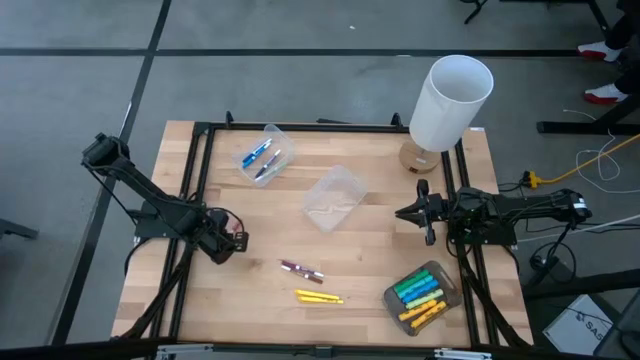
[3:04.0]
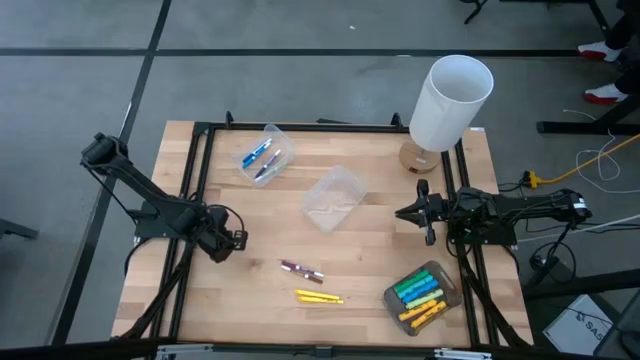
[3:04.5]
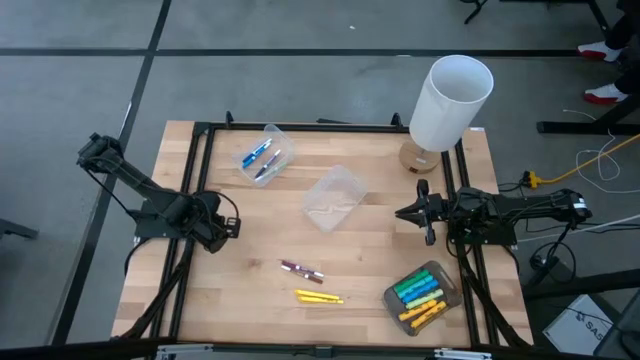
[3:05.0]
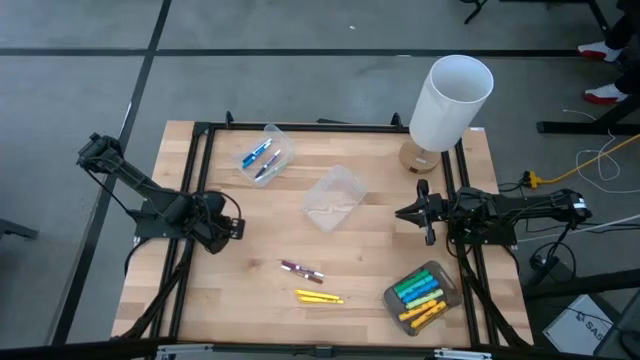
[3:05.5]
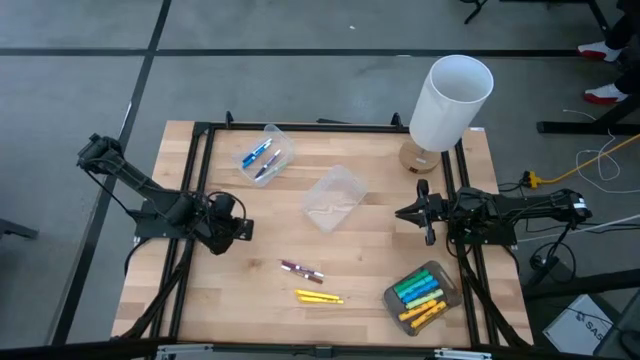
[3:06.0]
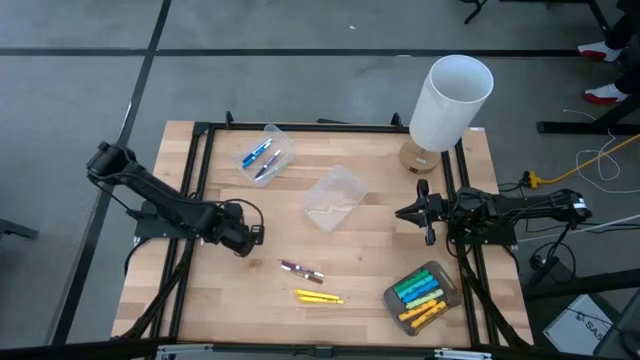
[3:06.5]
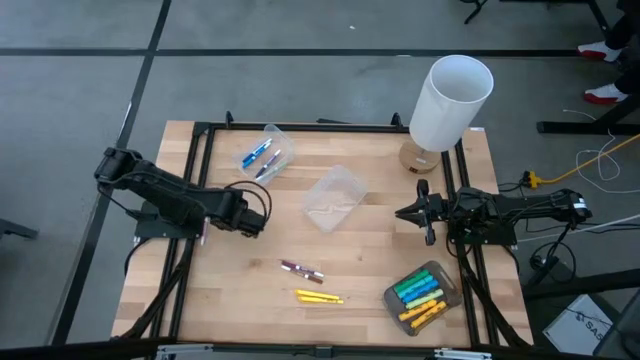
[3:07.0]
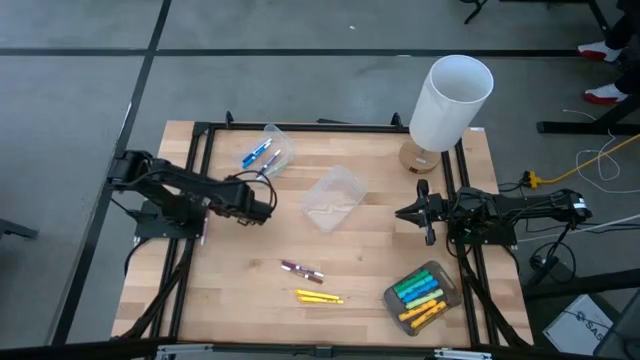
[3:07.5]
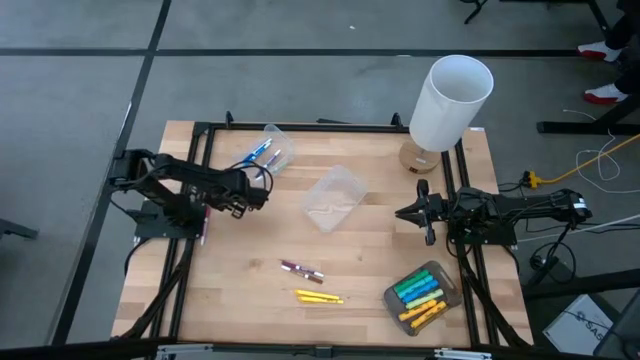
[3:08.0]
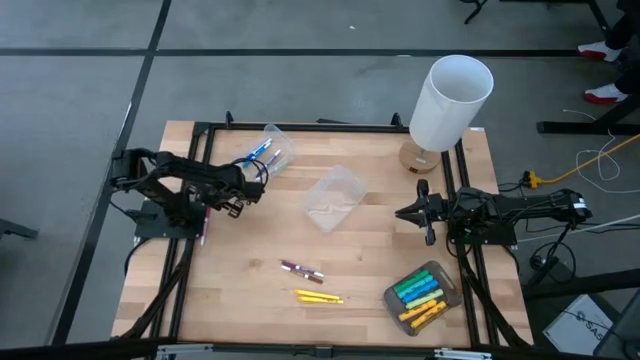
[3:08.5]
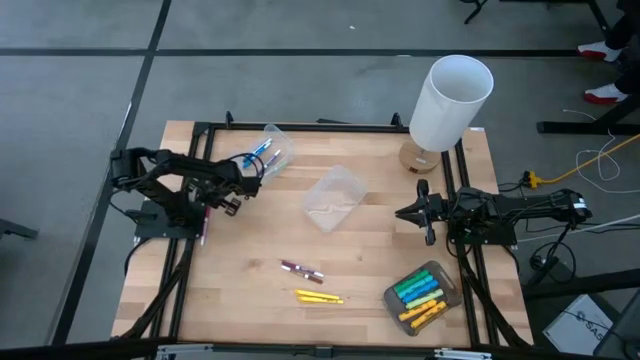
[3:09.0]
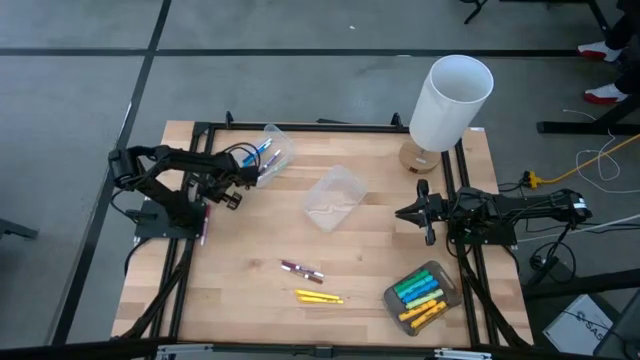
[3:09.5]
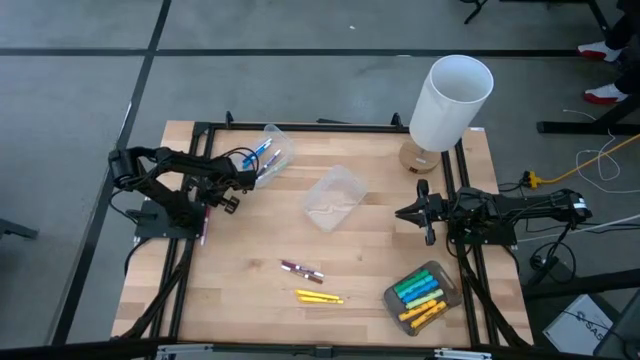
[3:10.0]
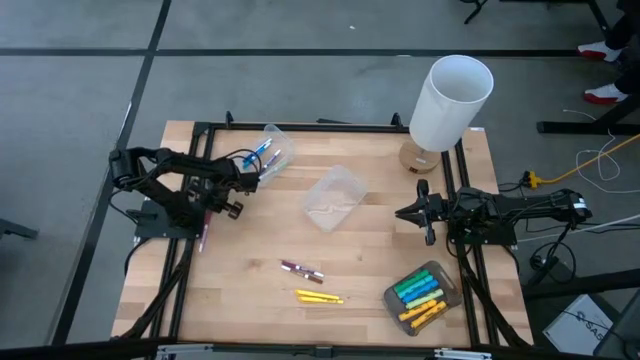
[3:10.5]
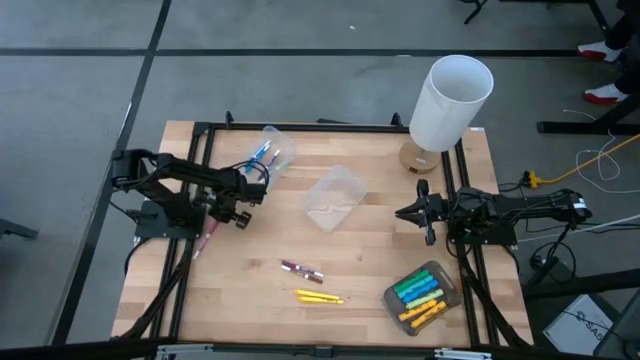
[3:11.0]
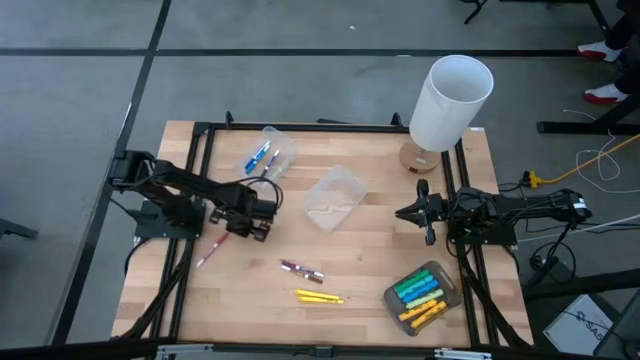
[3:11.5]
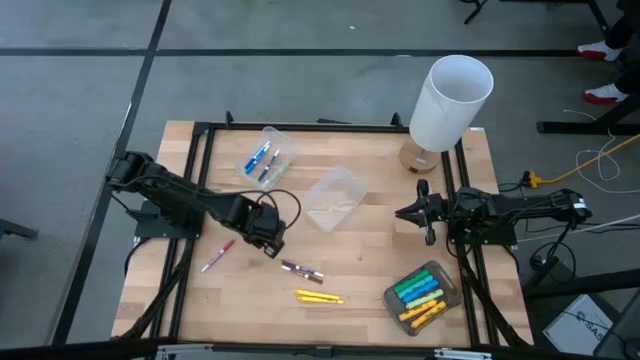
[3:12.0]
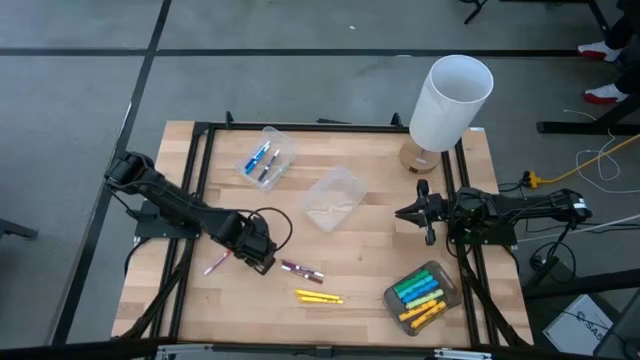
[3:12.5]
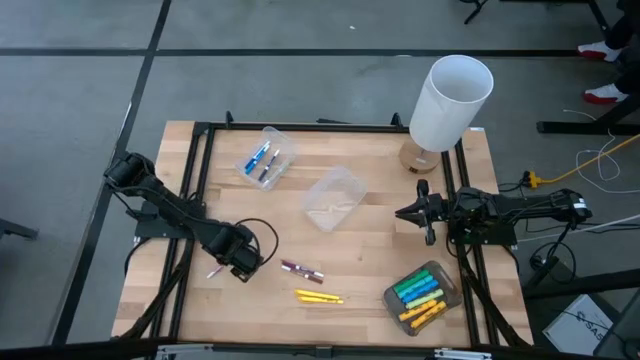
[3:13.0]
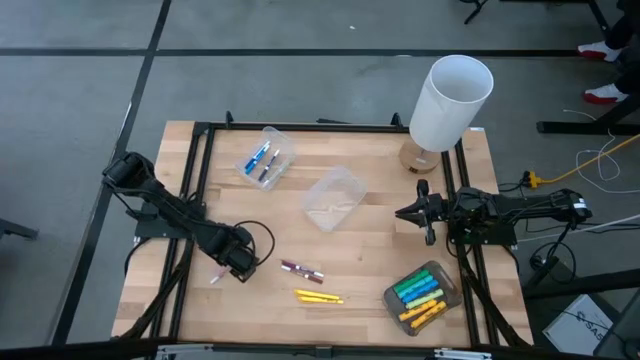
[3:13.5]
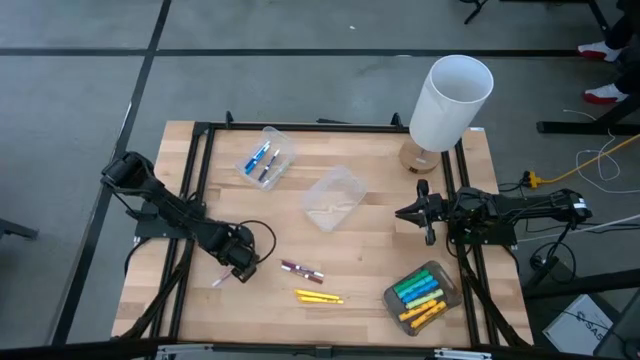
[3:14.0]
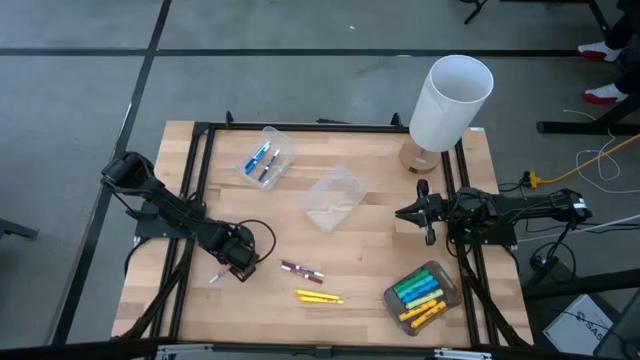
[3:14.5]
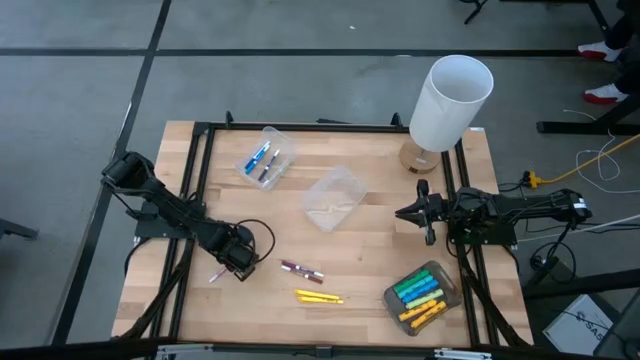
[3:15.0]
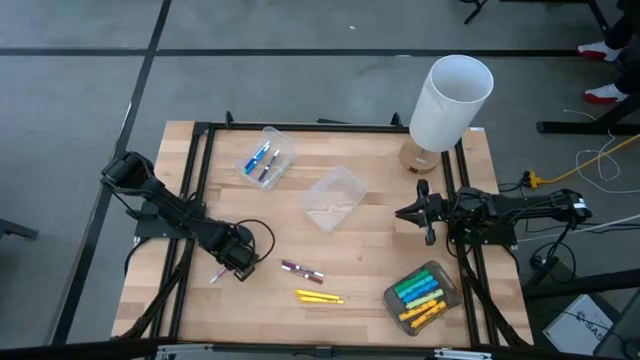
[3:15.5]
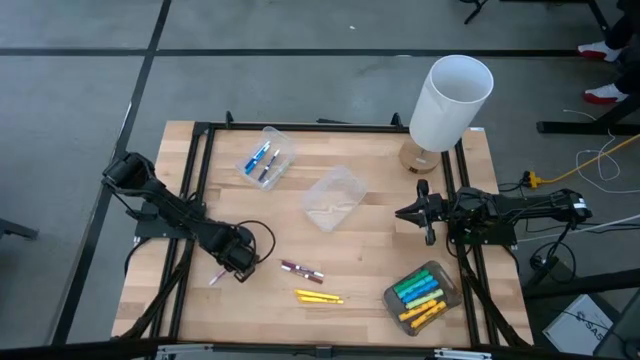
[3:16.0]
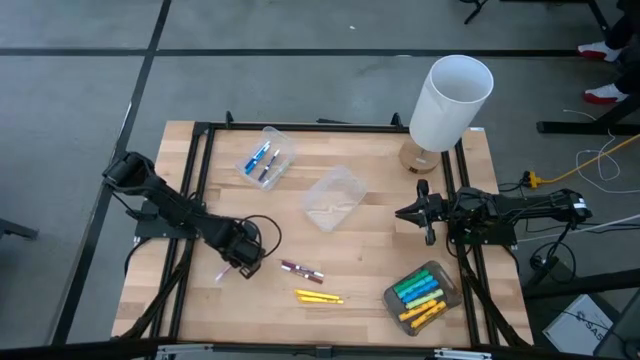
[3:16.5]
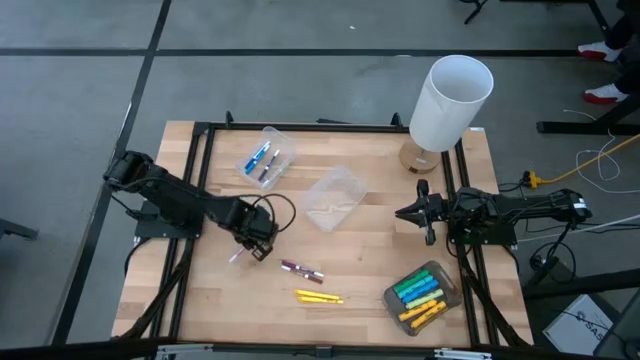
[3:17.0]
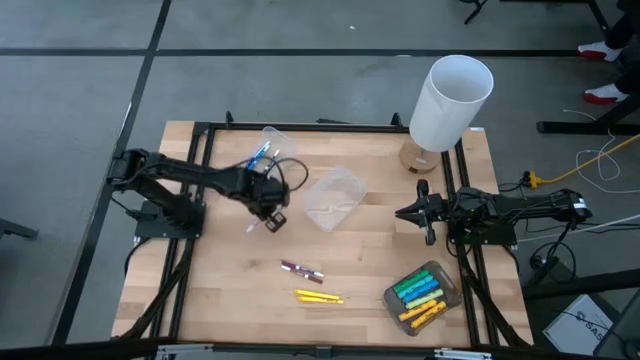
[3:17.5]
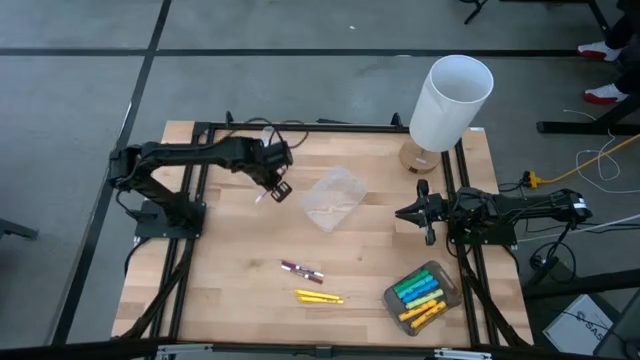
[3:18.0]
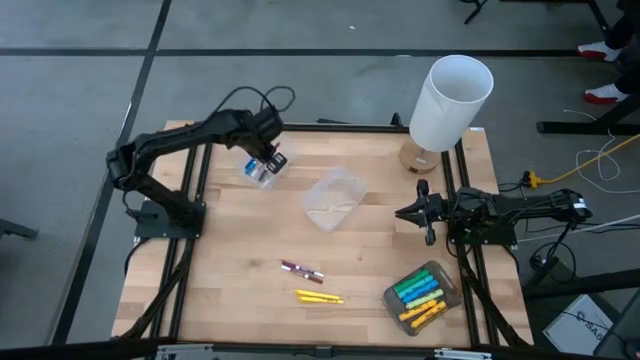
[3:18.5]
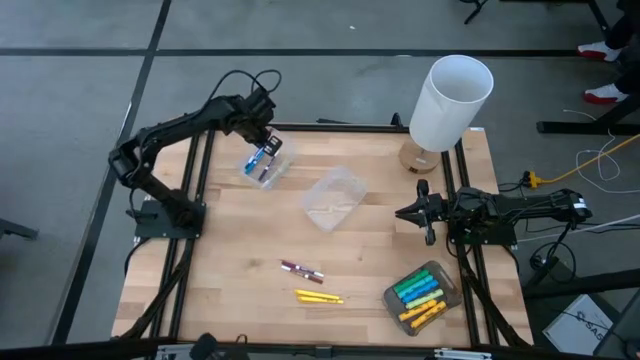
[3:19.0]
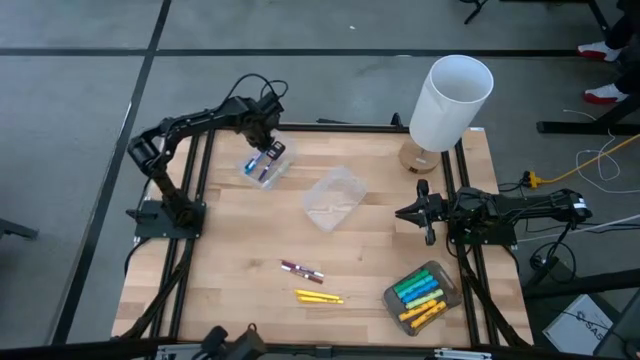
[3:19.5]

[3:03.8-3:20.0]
Task: Pick & Place Markers
Put the pink marker into the transparent bin

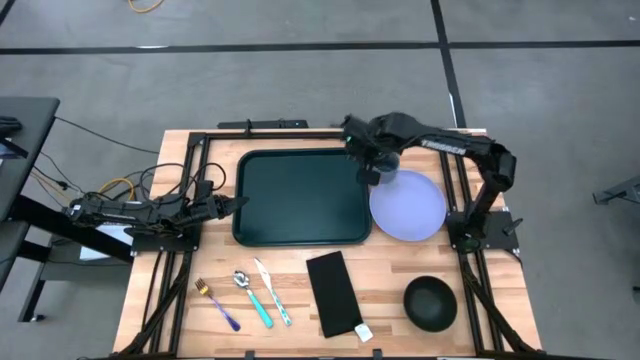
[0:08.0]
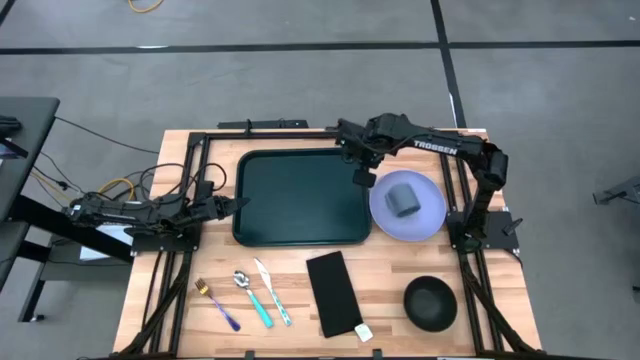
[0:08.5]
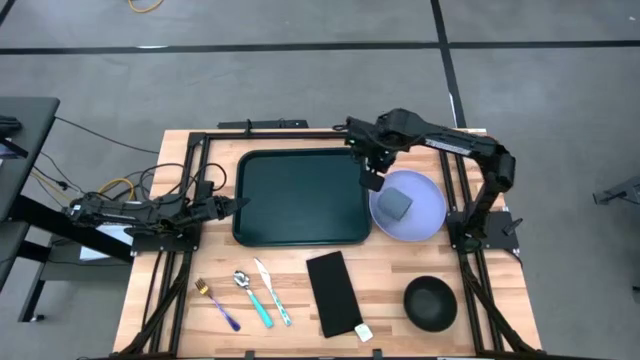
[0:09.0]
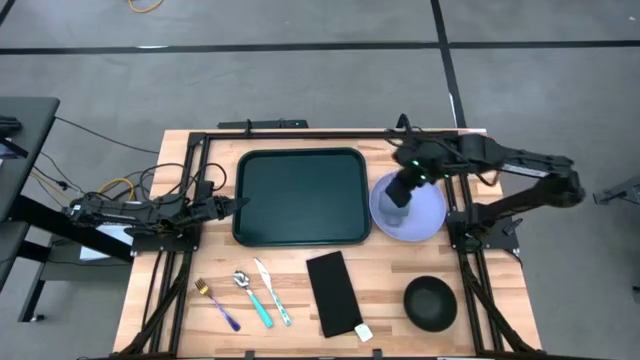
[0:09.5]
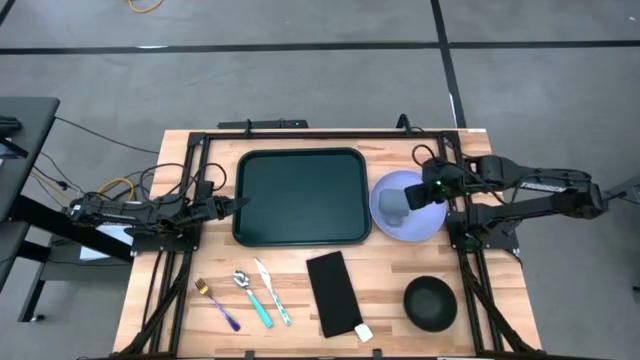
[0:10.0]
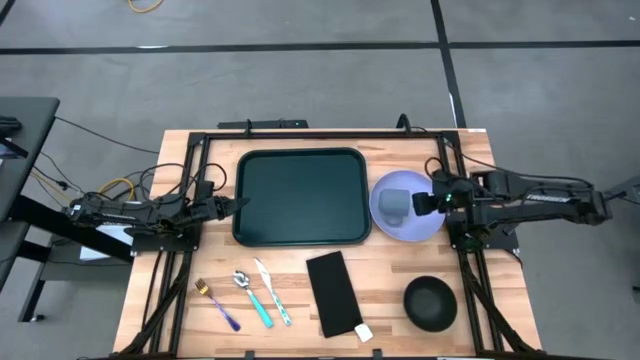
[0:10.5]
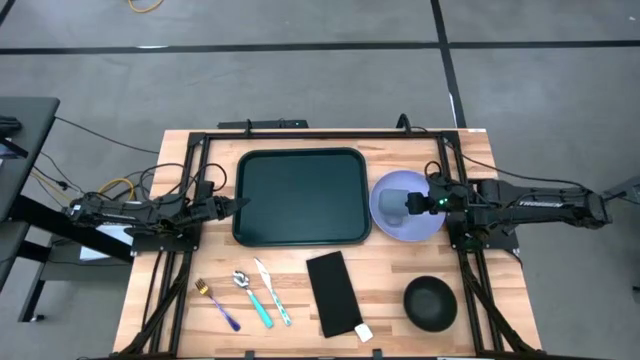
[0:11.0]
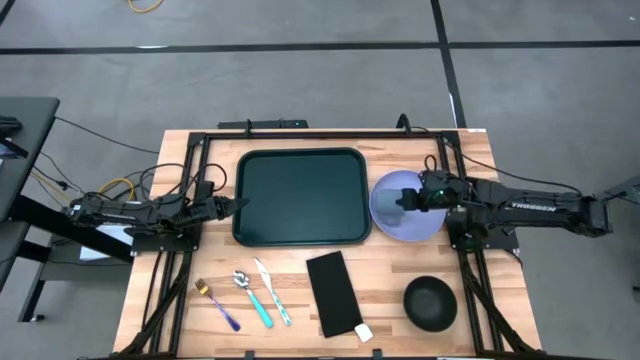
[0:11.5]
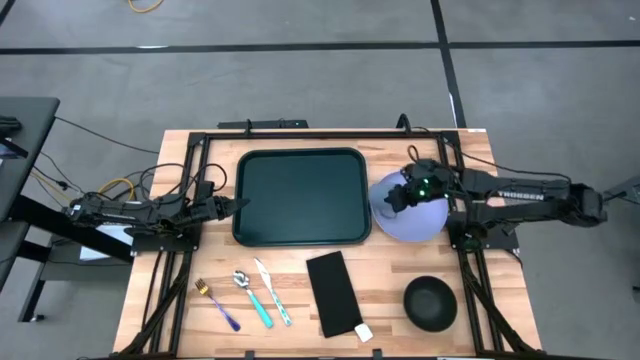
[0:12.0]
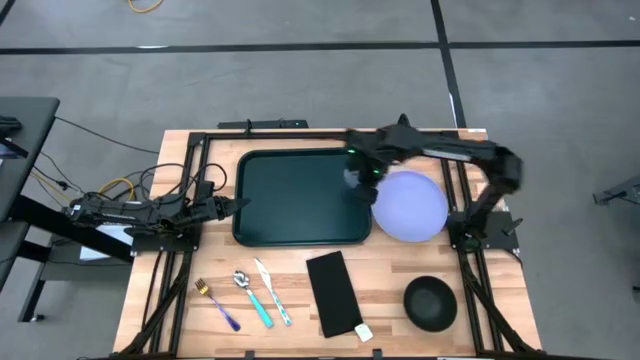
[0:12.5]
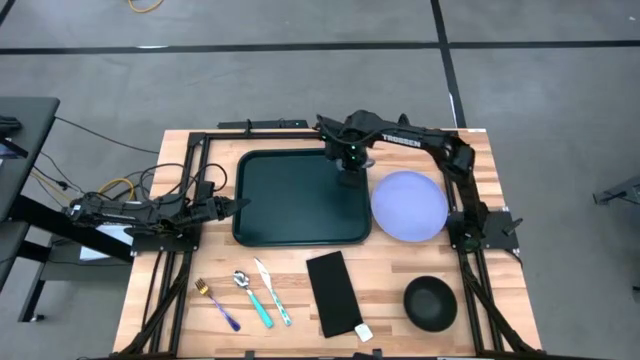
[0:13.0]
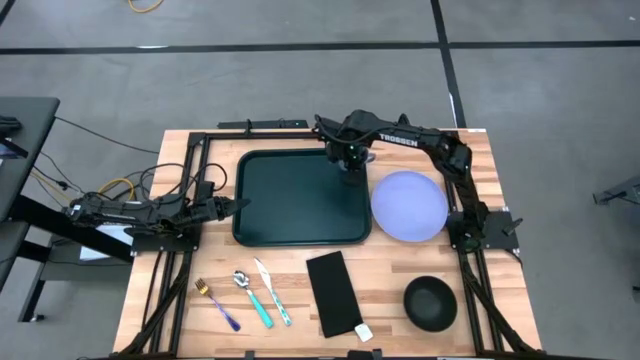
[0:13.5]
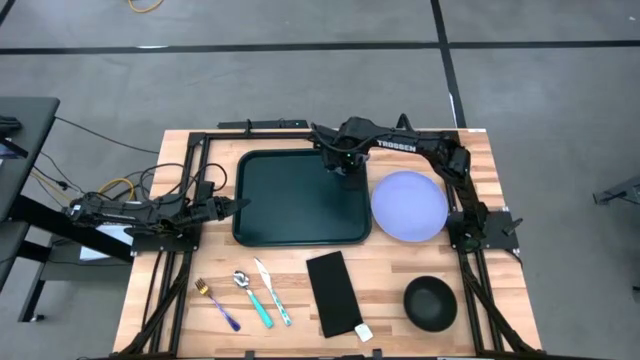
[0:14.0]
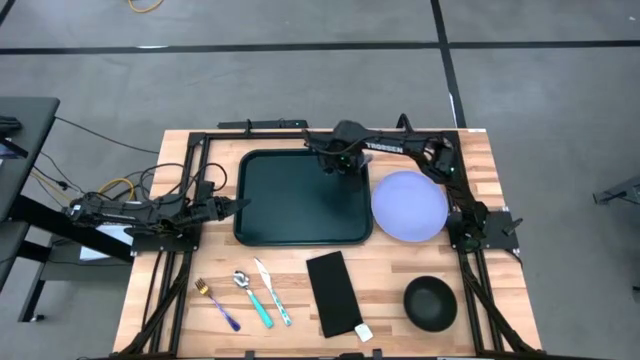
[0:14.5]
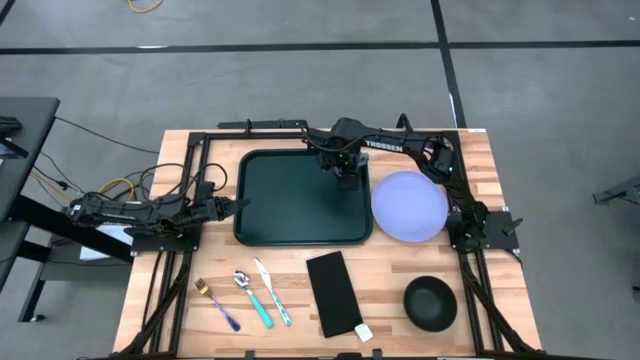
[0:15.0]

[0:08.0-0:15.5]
Task: Set up tray
Put the gray mug on the black tray
